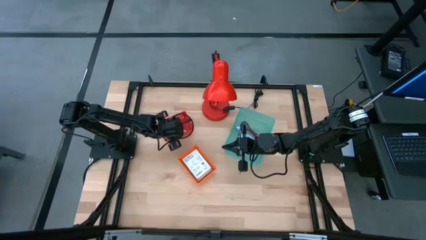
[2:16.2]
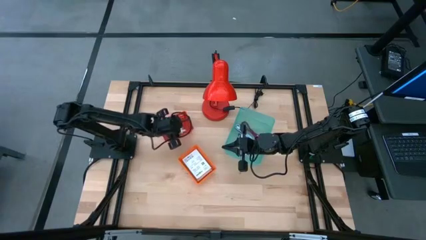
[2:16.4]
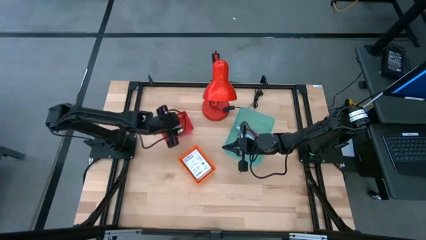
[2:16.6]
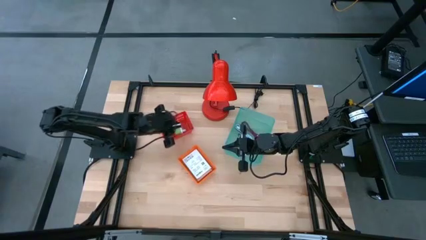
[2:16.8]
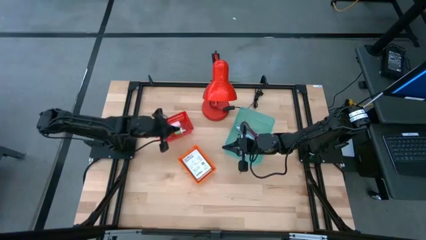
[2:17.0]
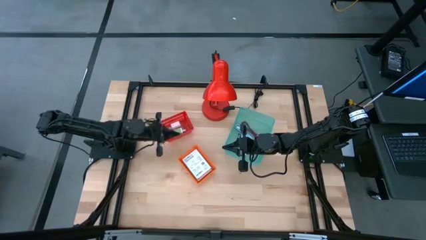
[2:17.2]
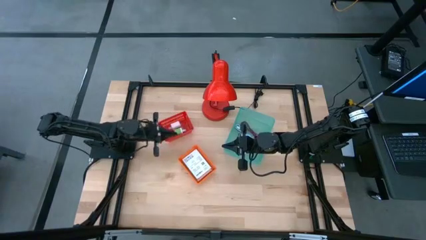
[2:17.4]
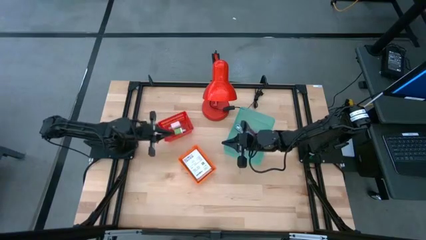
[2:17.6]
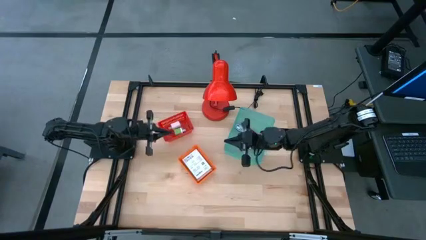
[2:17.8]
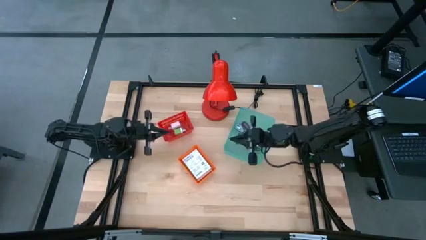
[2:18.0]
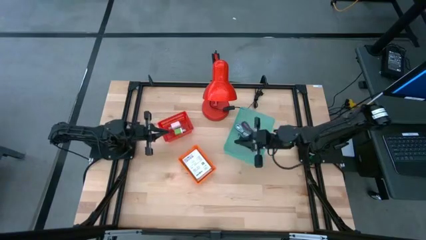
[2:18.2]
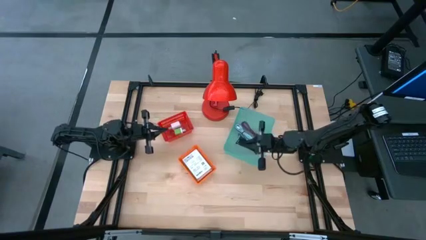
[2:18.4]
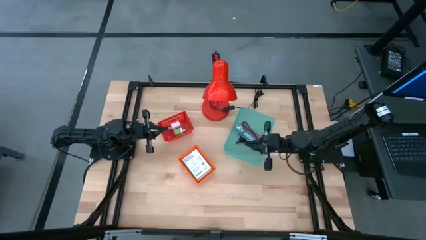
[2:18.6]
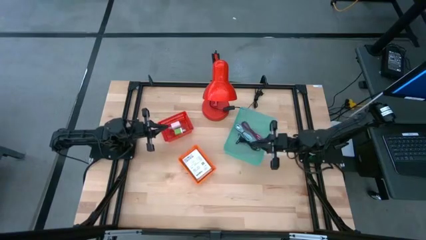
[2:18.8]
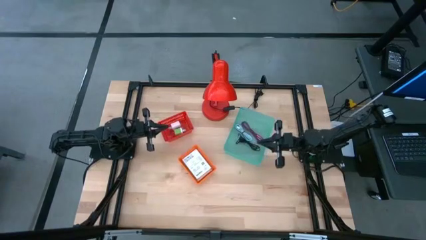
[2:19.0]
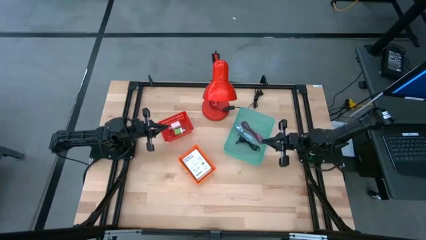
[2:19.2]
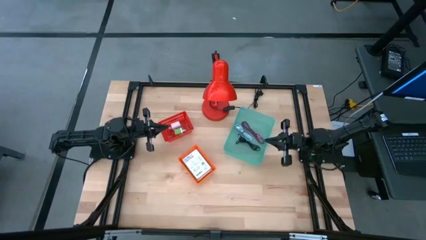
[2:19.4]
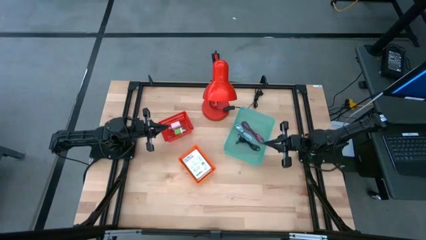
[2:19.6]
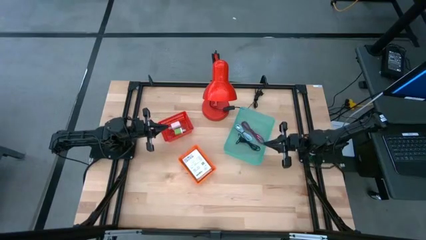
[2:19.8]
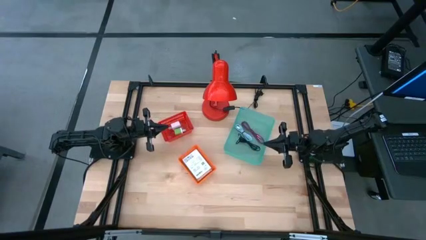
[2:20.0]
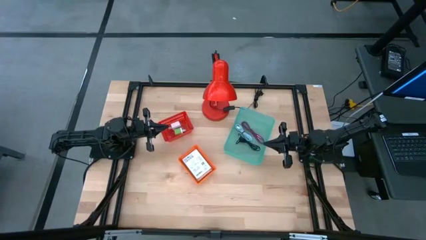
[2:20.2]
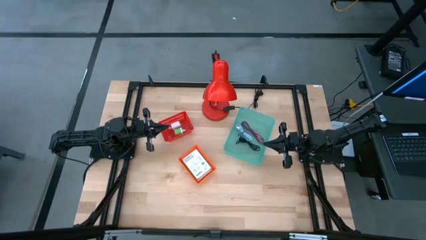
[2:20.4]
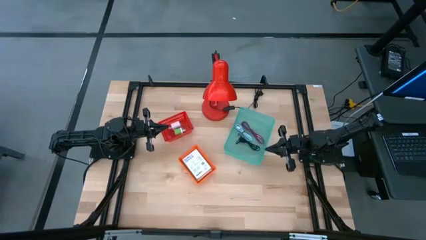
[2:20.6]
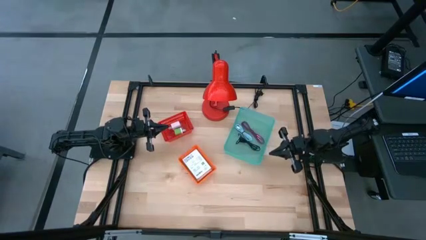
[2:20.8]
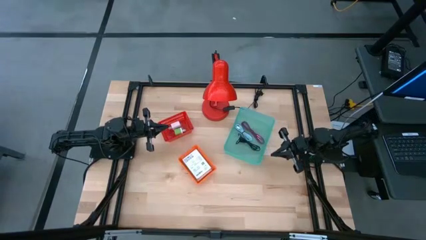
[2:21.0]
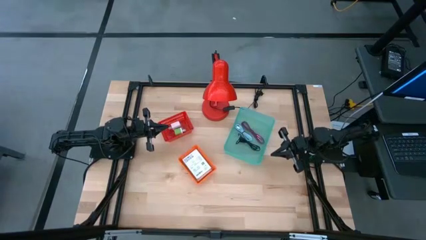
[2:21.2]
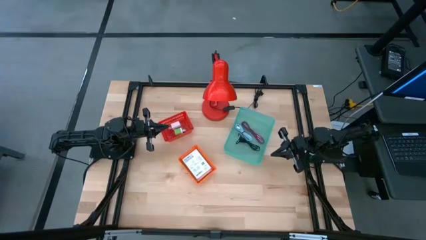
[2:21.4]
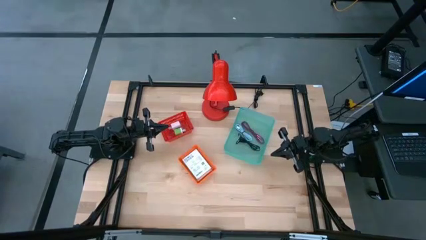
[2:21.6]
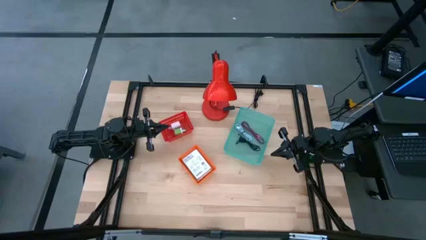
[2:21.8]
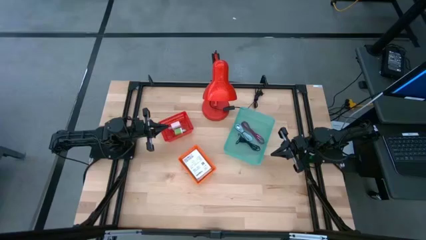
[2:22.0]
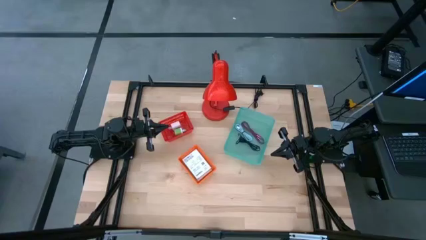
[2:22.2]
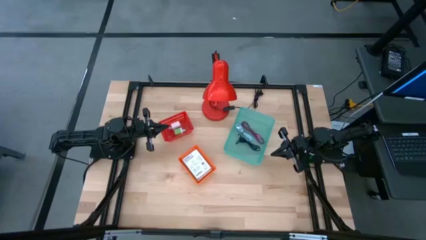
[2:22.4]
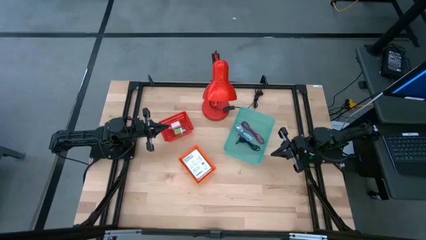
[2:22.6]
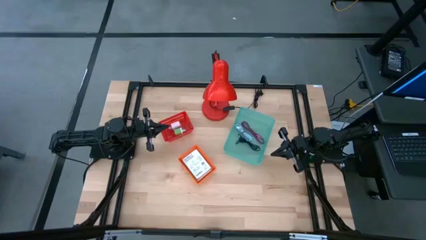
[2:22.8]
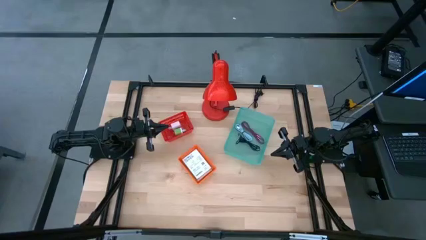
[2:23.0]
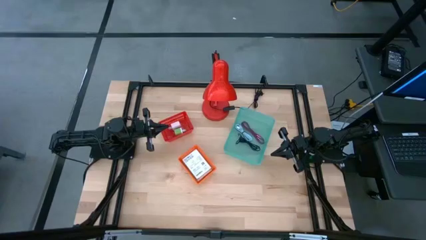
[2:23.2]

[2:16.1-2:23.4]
Task: Pick and place items into bin
Return to Home Position

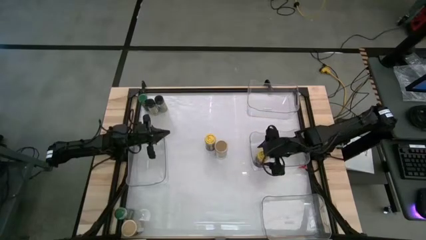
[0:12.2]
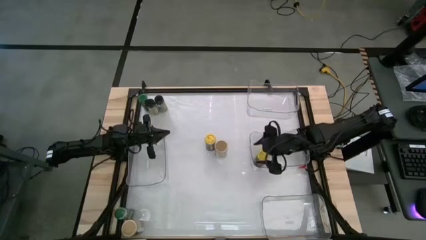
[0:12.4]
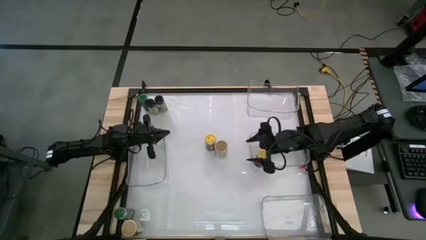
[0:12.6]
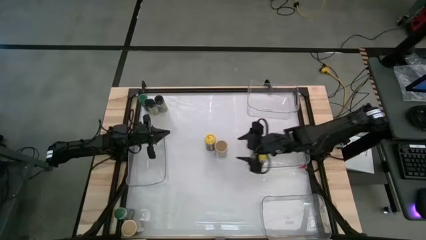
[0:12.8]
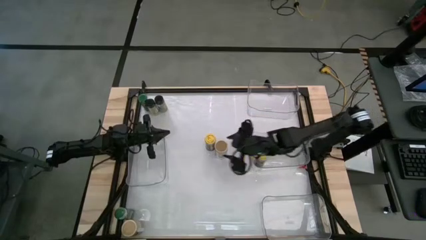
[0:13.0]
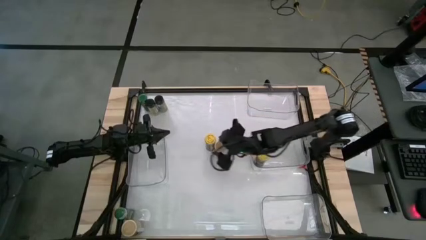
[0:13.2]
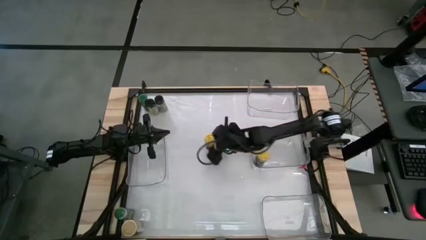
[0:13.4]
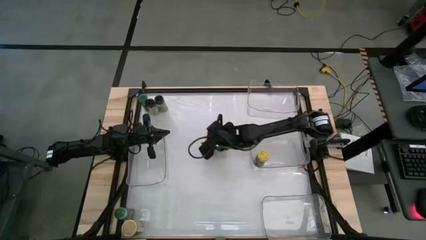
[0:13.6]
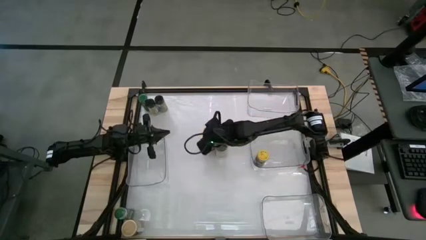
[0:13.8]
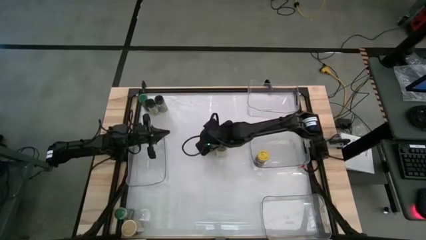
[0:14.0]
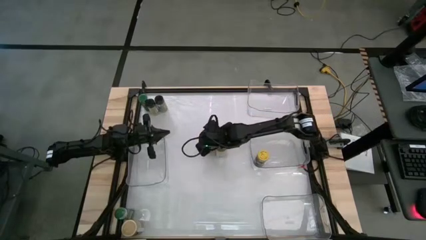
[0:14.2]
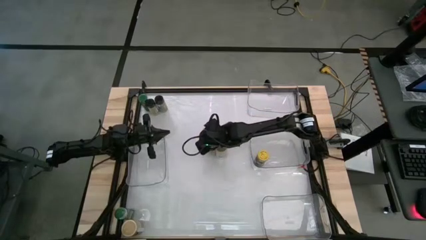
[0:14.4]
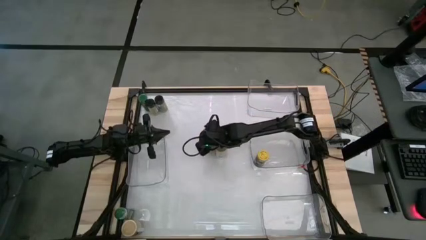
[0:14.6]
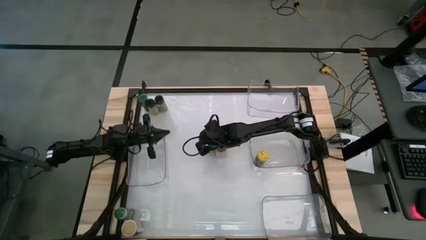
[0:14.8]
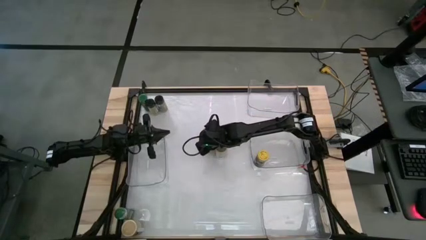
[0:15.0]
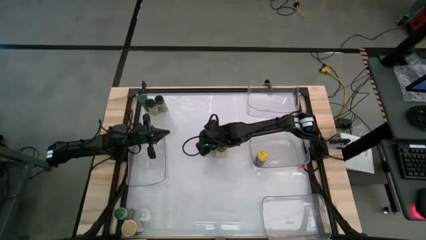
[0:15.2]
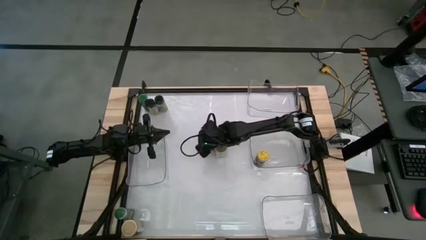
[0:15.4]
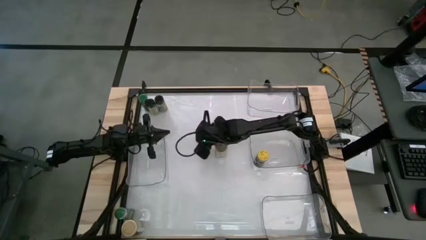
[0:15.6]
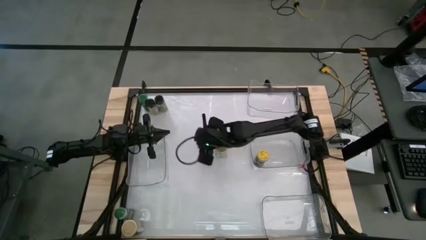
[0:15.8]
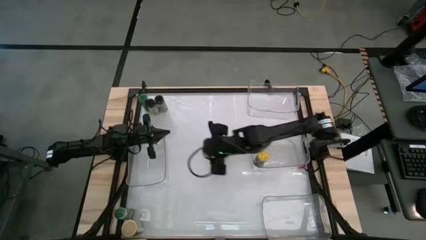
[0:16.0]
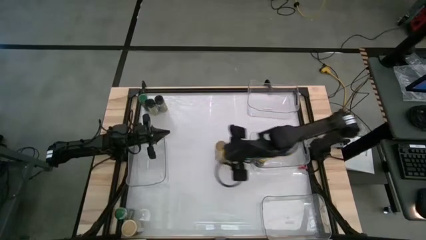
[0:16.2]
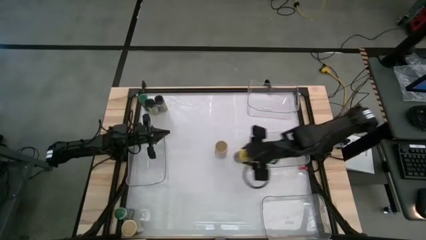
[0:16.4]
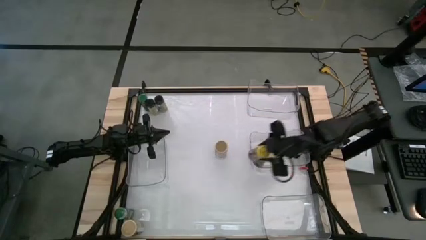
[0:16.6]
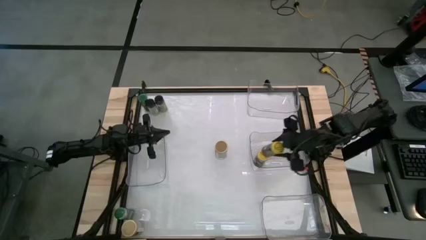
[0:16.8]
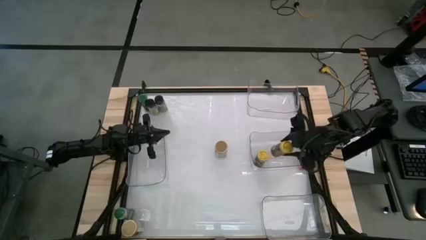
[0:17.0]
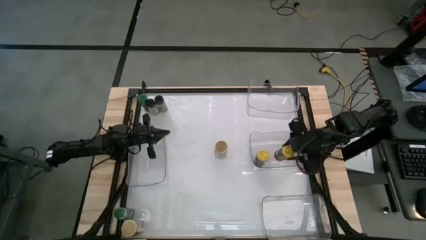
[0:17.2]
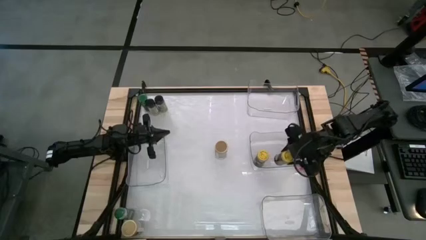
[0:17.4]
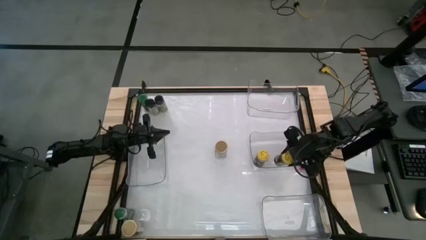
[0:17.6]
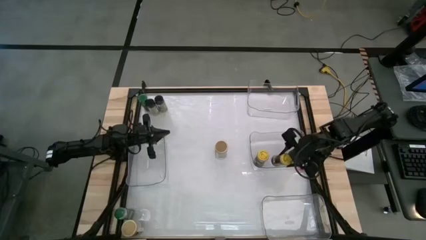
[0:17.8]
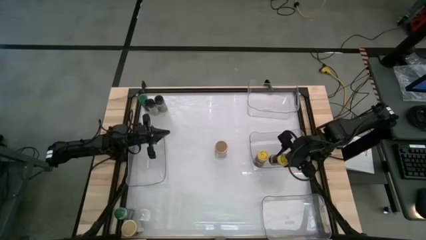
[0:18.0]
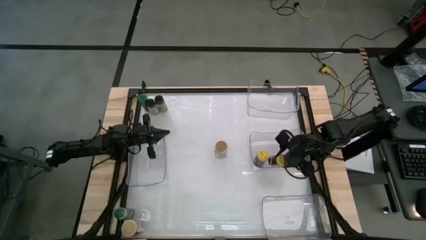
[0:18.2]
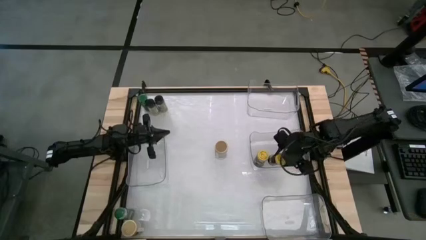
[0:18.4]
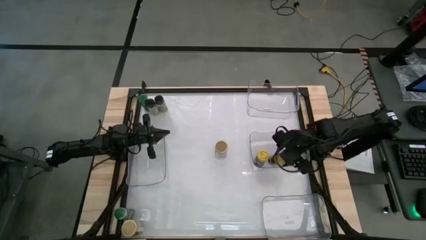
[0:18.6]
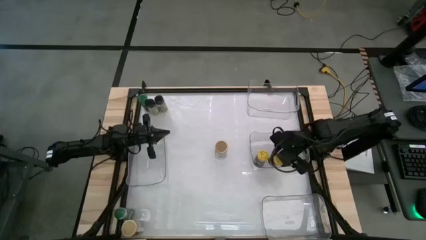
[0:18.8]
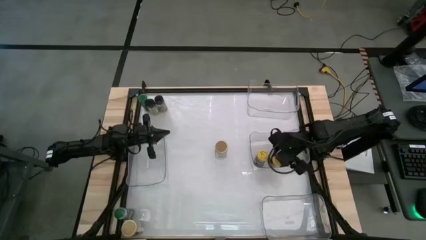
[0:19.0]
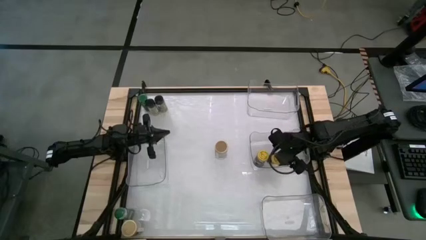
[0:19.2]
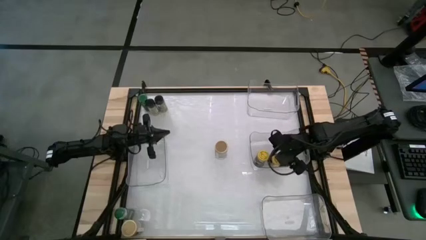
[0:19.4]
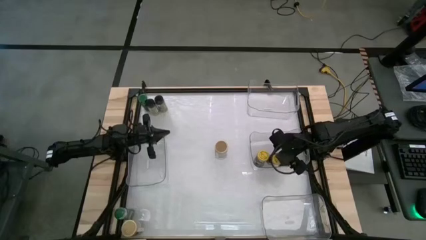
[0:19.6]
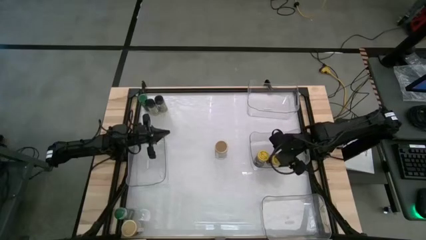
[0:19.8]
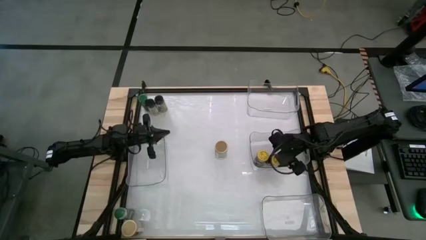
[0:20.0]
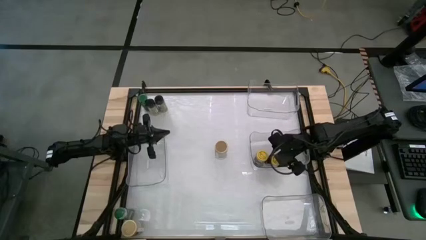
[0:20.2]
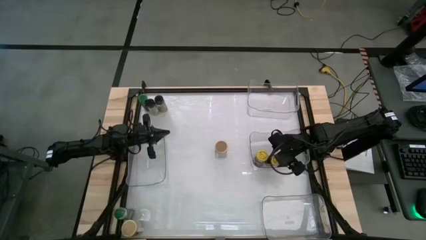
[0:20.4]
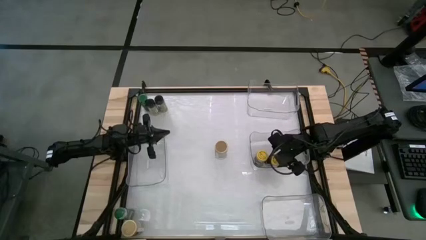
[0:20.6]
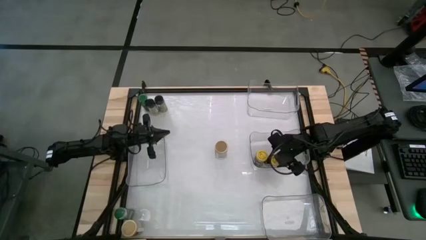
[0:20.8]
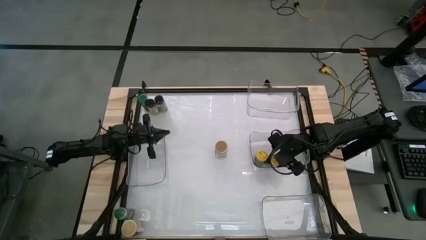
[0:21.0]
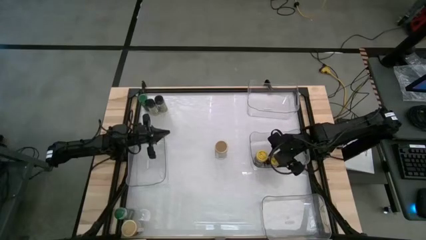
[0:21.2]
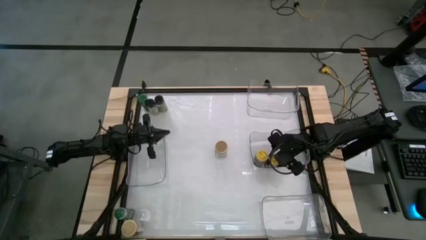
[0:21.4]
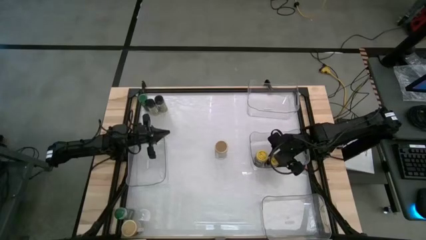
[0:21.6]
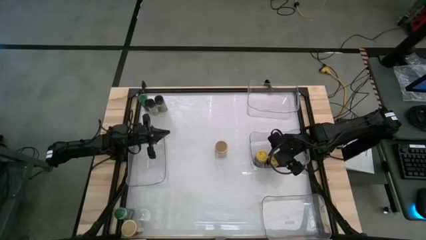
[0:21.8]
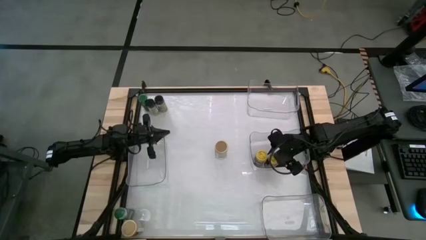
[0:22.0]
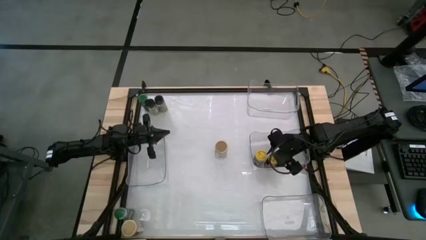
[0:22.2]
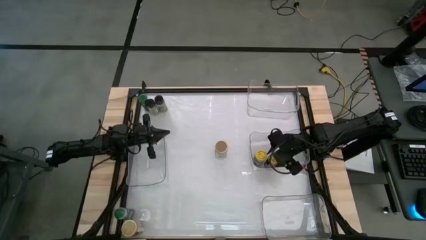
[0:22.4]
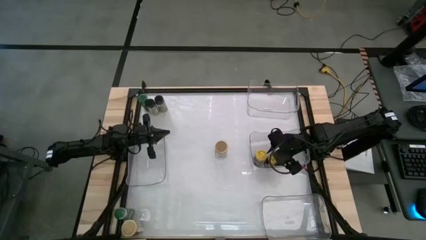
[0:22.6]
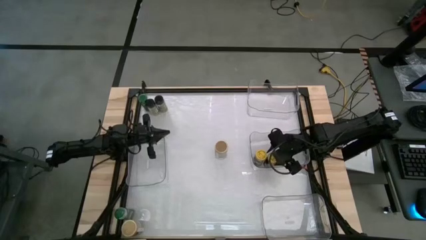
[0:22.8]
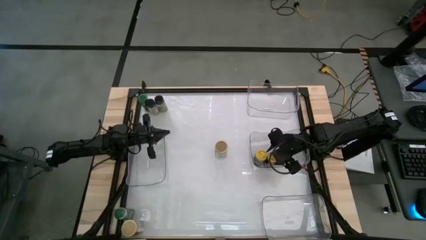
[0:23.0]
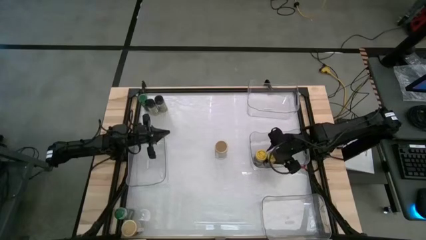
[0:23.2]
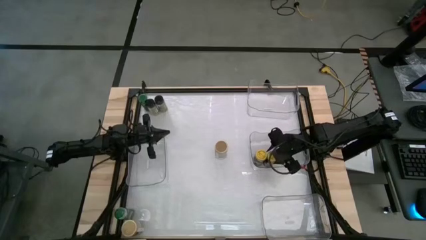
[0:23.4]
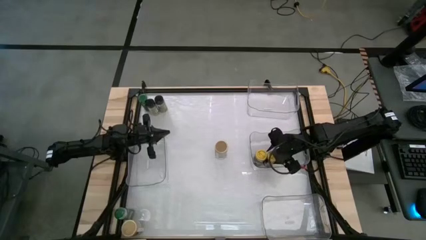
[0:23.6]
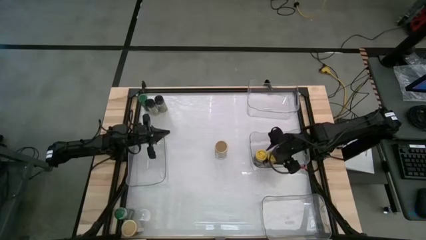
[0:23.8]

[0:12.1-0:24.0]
Task: Sort spices by type
Put the yellow seasoning bottle into the middle right transparent bin
